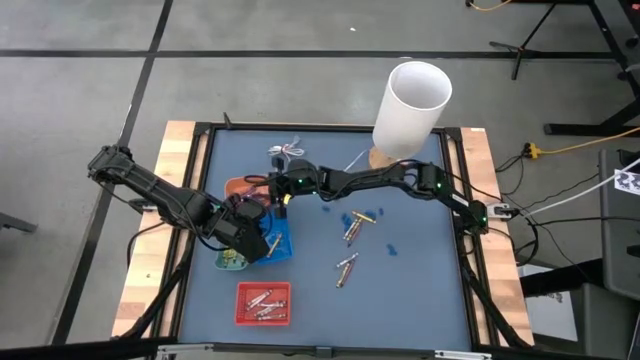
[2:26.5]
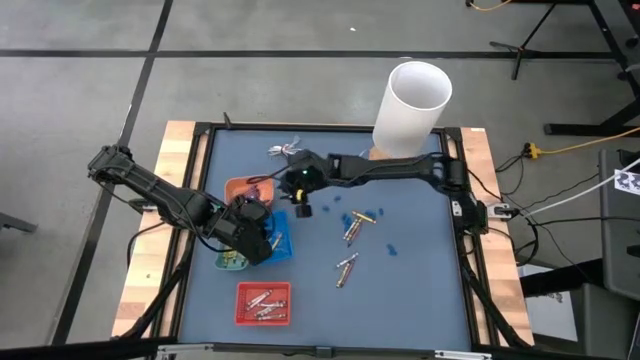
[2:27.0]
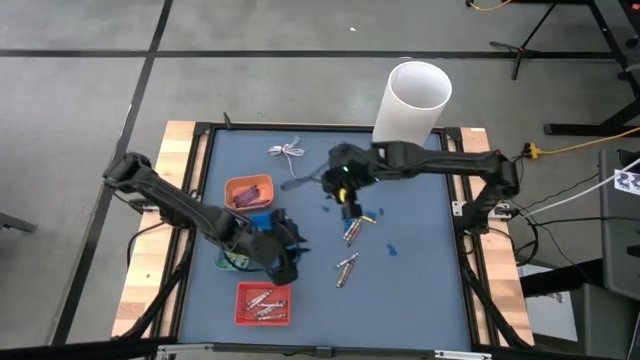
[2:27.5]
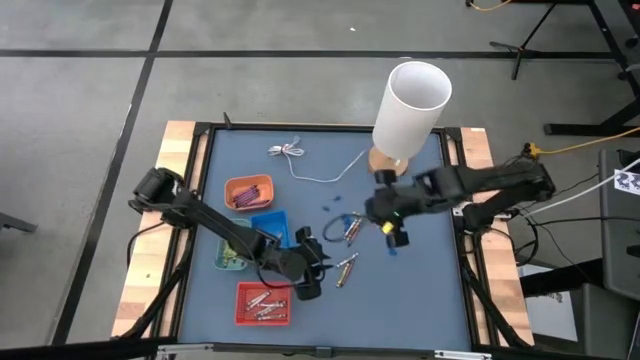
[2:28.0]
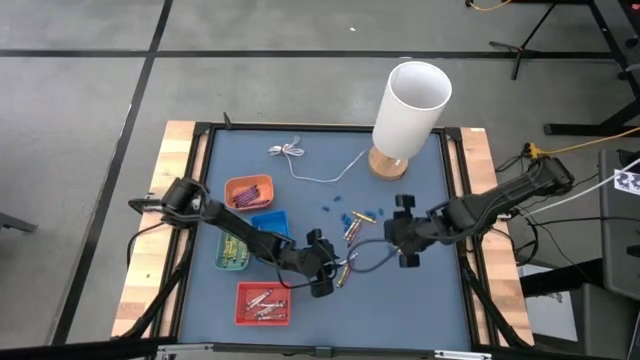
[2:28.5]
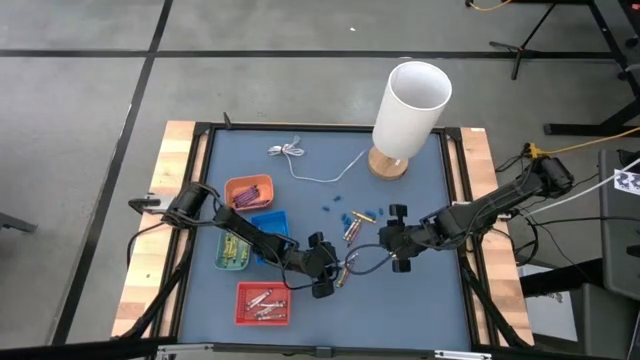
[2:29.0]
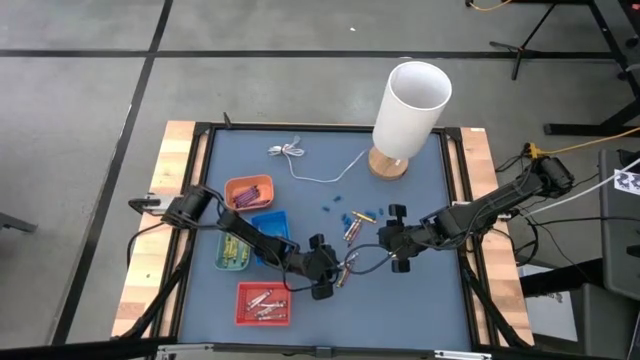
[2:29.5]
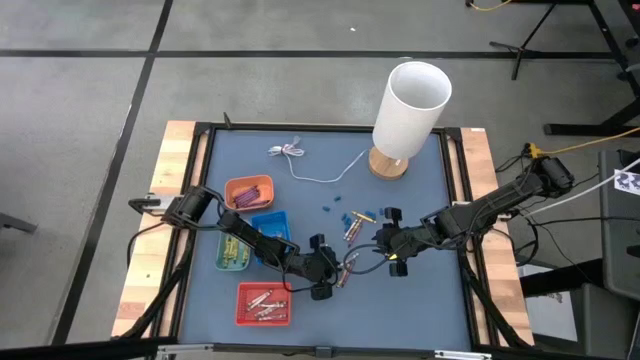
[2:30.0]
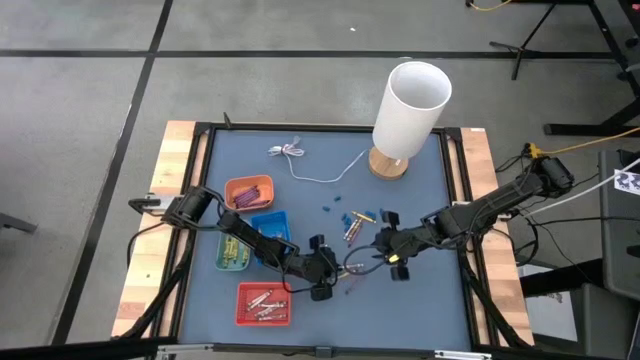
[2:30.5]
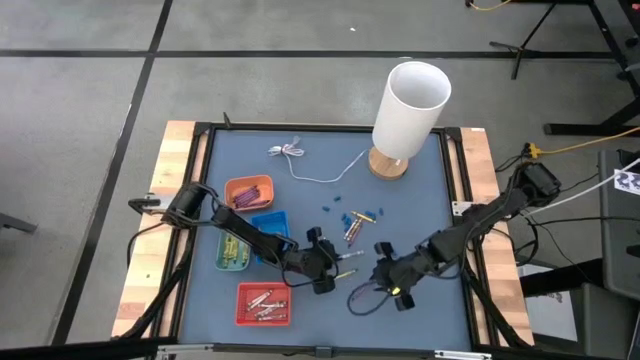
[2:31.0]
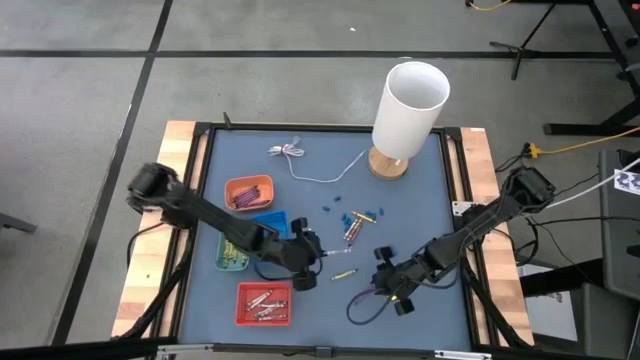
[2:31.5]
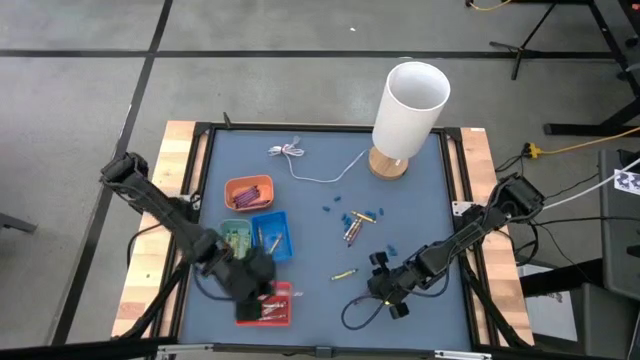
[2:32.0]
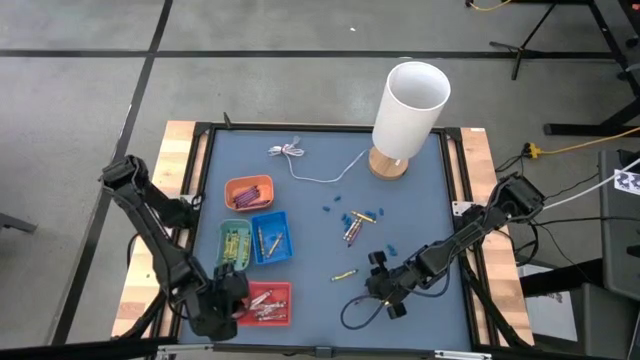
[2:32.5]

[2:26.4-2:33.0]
Task: Sort crayons
Put the gray crayon into the orange basket

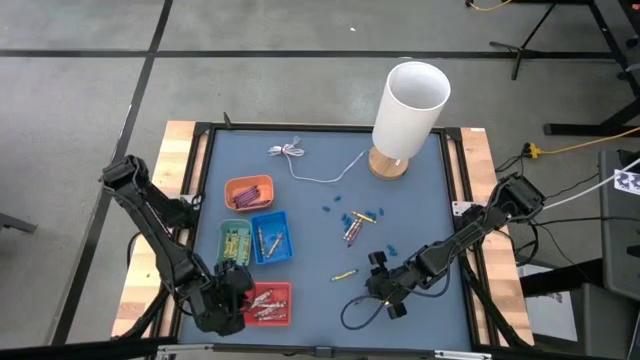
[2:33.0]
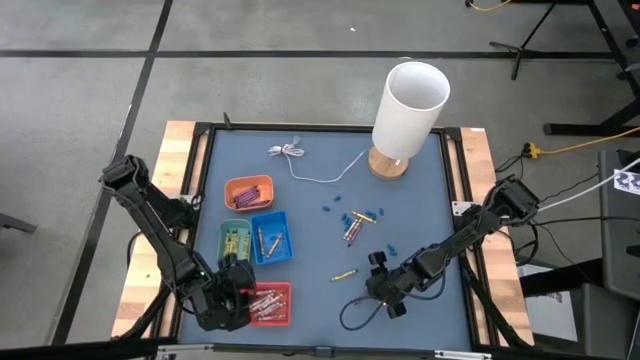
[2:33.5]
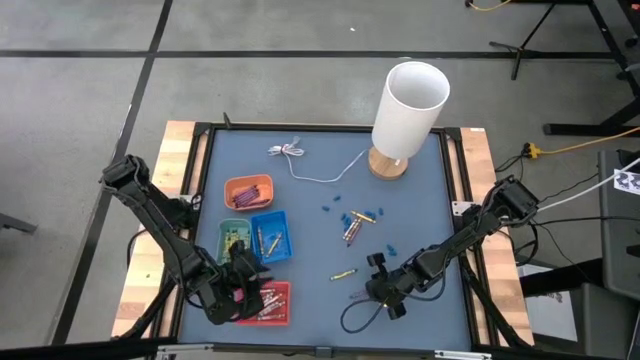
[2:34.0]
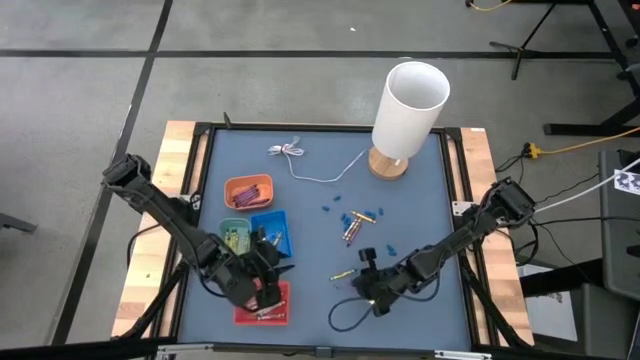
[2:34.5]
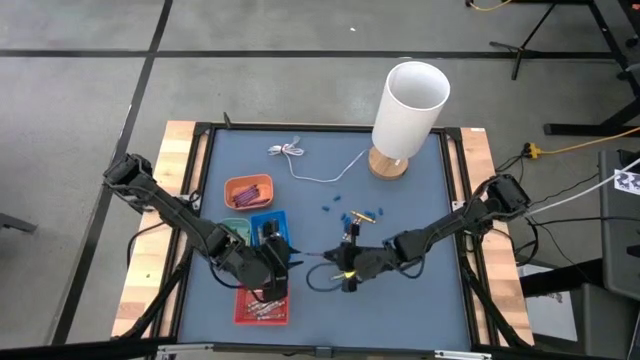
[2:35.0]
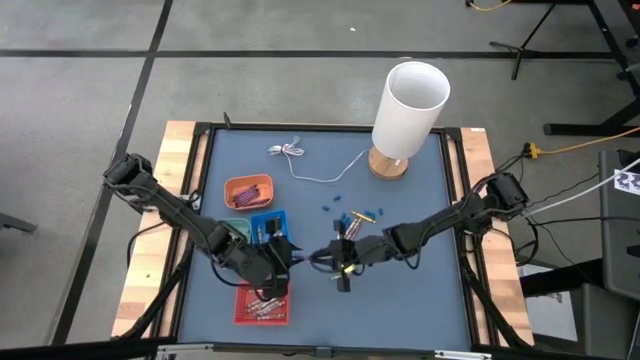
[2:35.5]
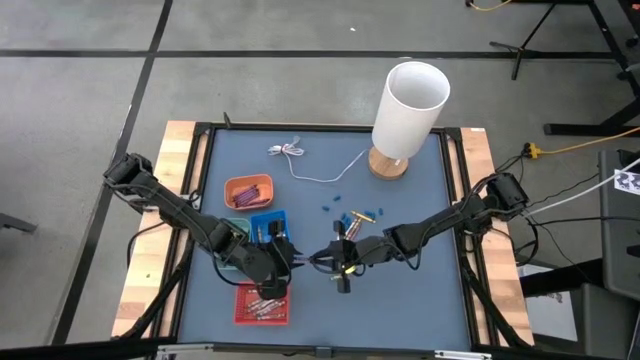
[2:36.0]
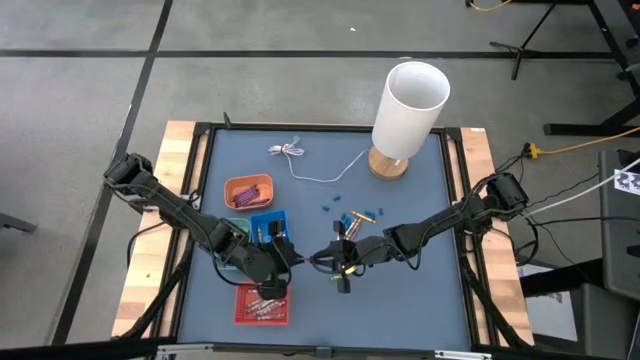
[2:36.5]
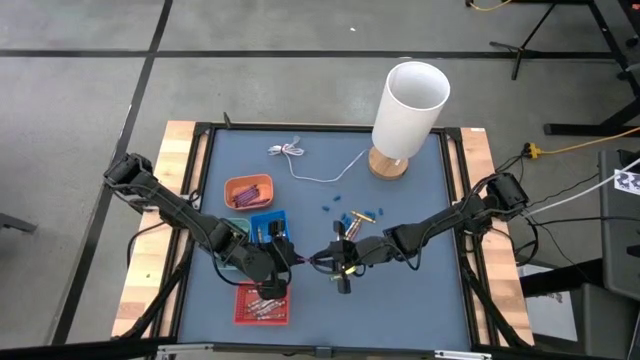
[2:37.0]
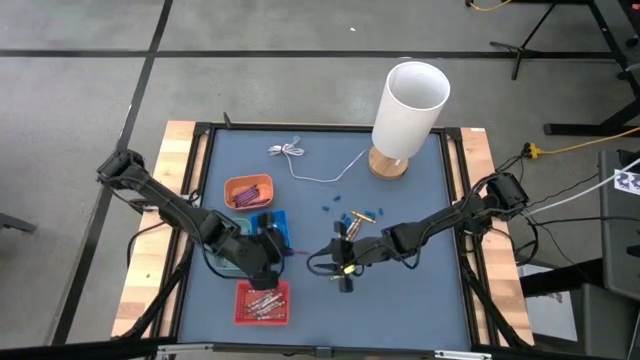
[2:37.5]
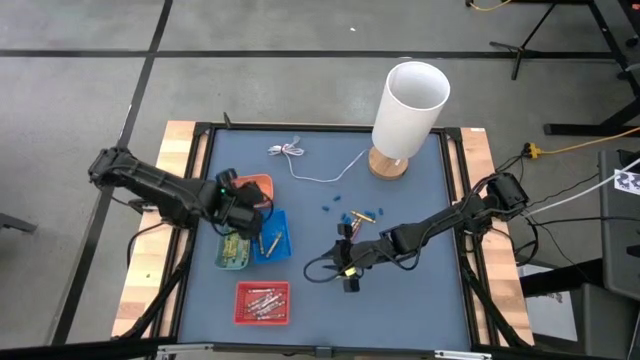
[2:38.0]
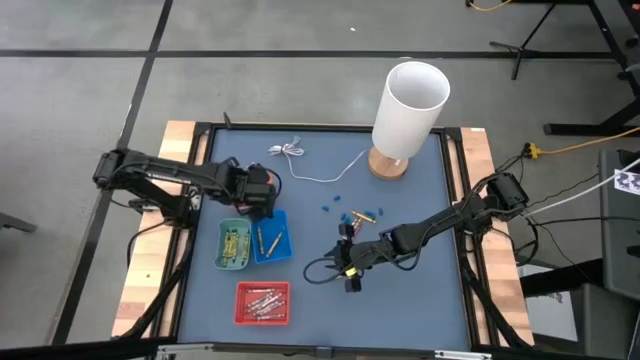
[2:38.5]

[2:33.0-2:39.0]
Put the violet crayon into the orange bin

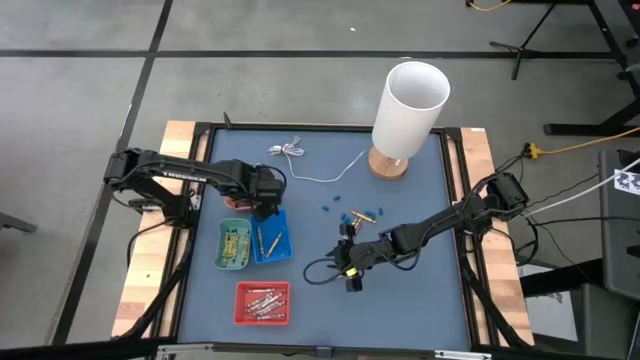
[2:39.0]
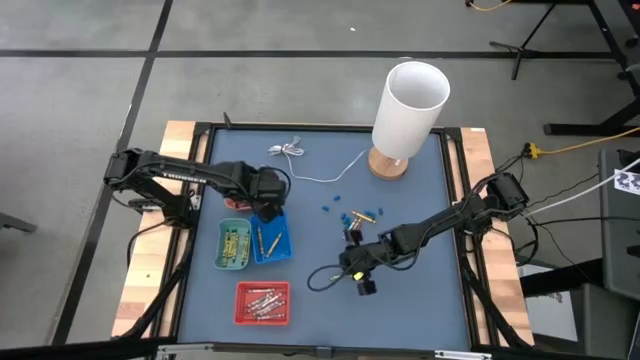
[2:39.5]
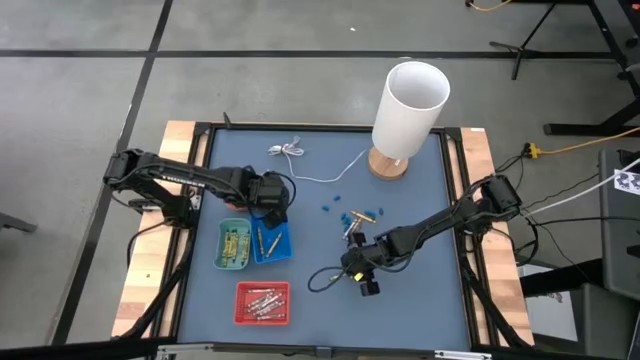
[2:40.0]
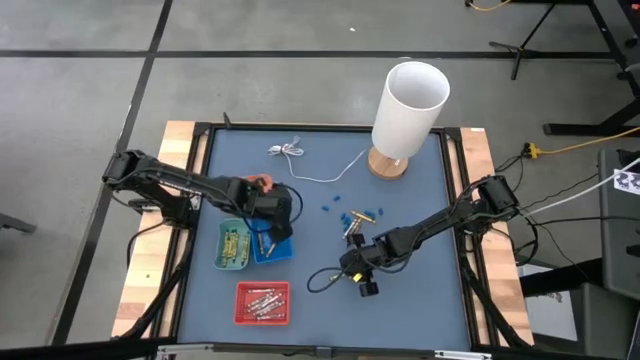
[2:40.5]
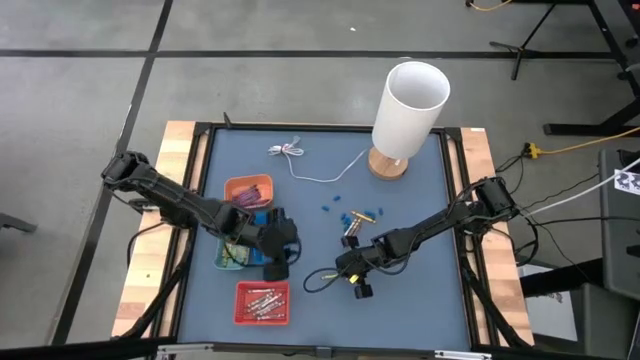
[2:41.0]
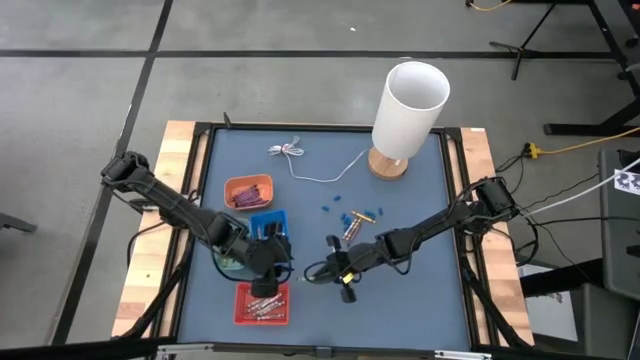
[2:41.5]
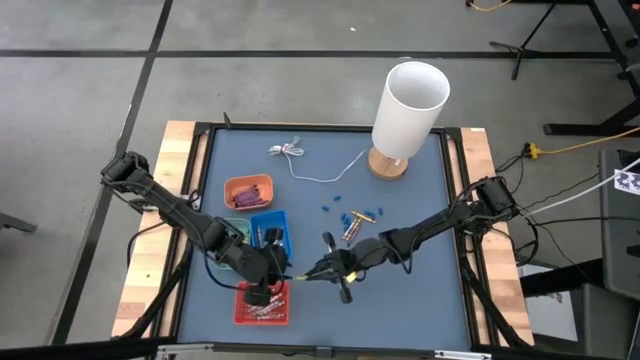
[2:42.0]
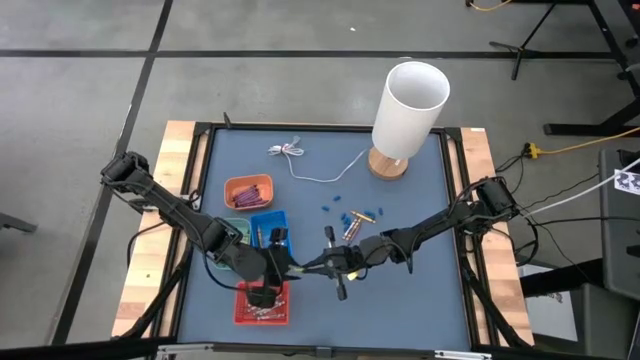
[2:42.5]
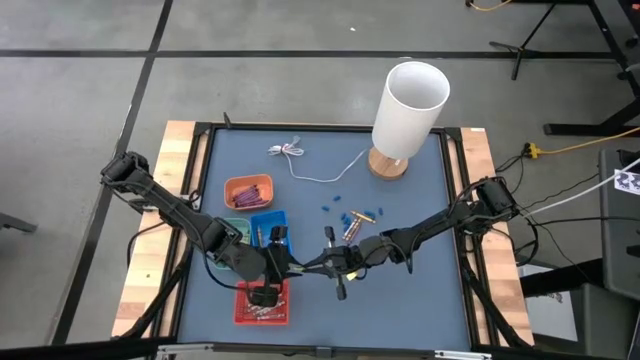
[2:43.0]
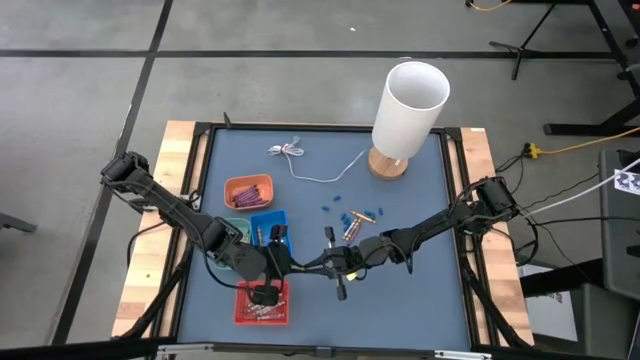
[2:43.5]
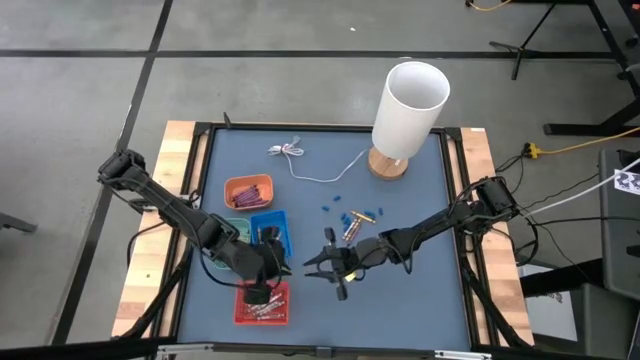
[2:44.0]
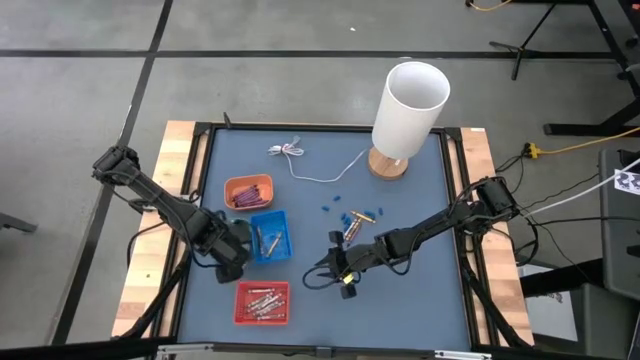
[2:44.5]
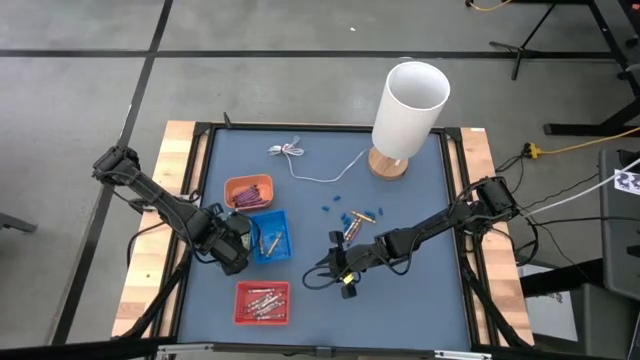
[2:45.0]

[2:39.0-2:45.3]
Put the green crayon into the blue green bin

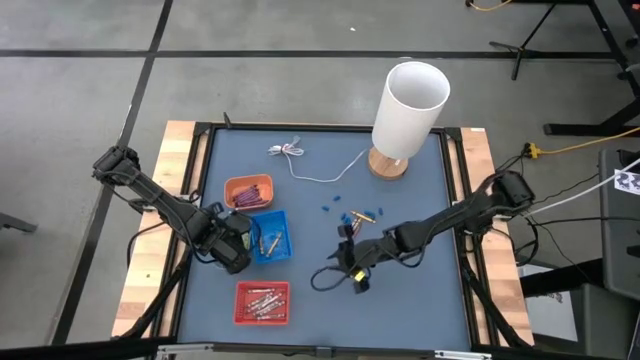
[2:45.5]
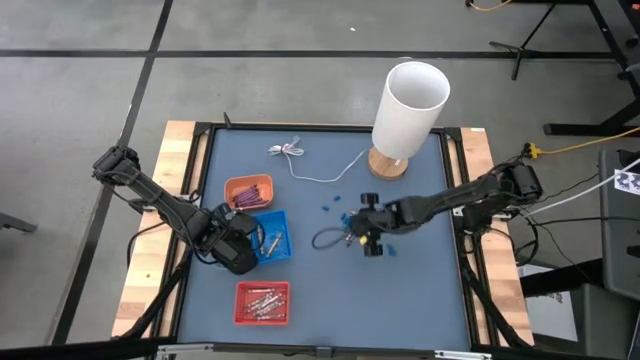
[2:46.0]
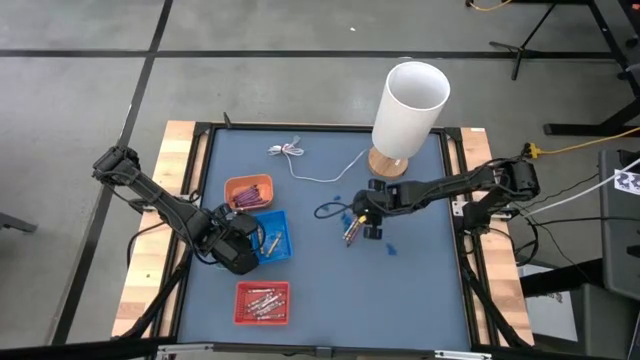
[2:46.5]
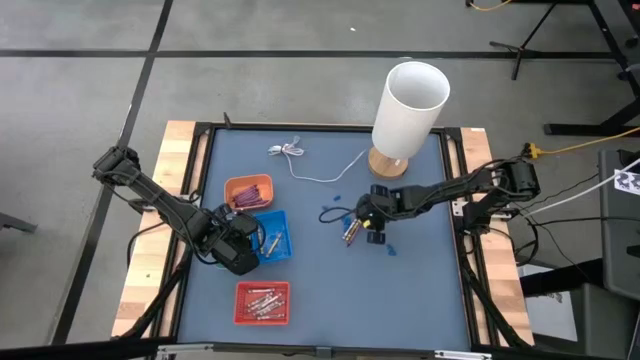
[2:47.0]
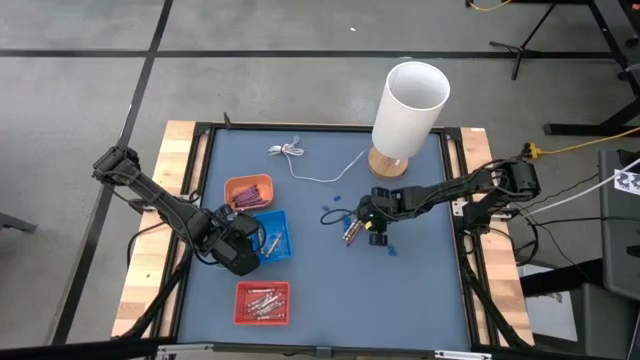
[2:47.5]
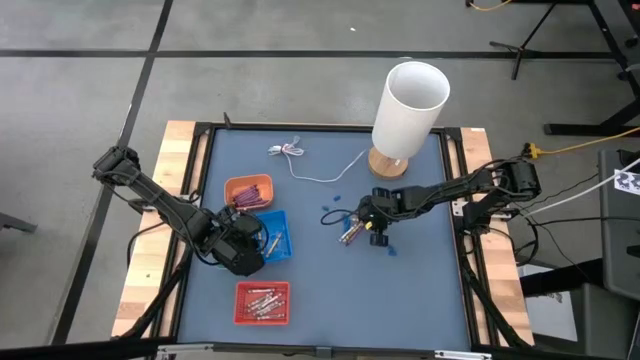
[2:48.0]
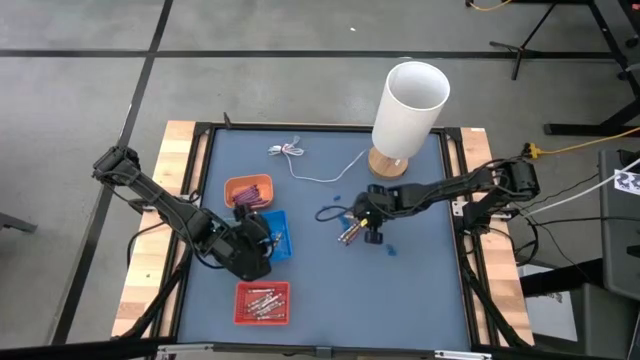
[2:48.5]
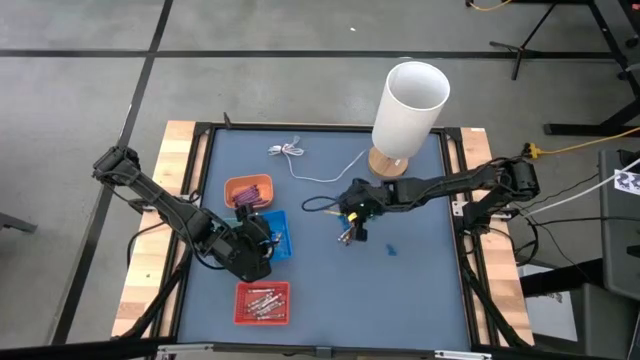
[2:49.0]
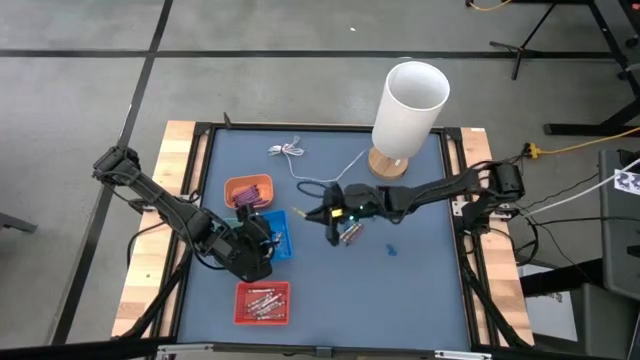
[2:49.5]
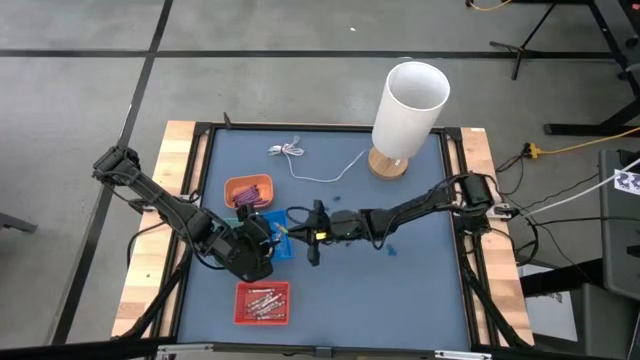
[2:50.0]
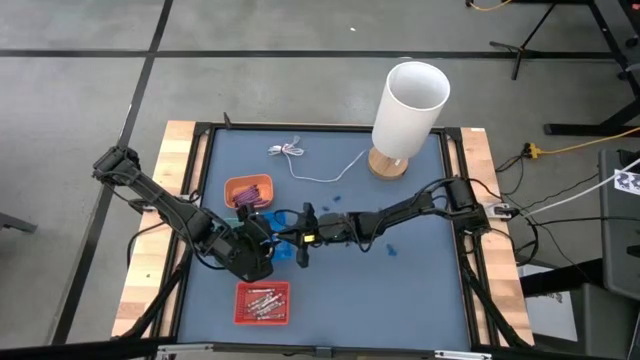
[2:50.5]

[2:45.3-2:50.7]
Put the yellow crayon into the blue basket
